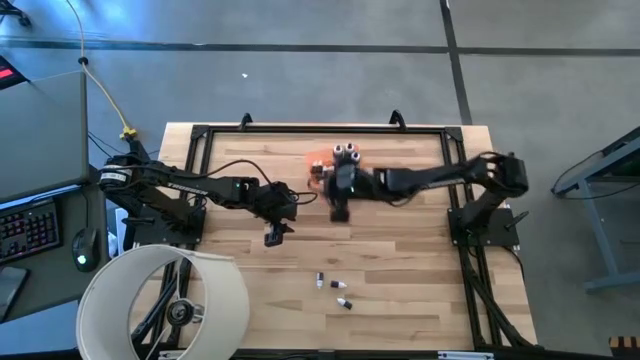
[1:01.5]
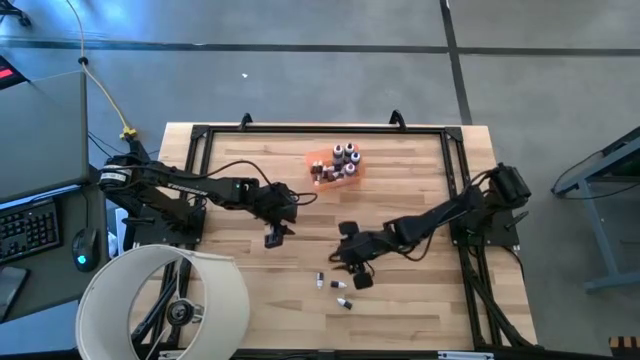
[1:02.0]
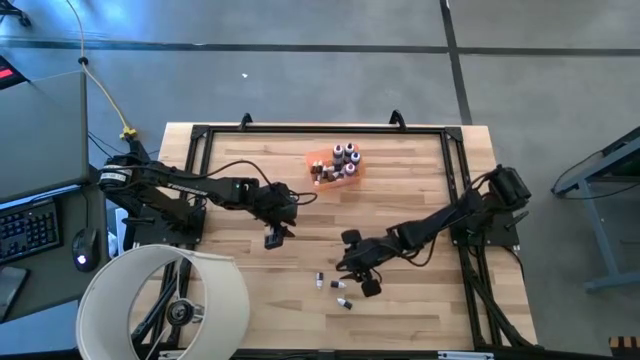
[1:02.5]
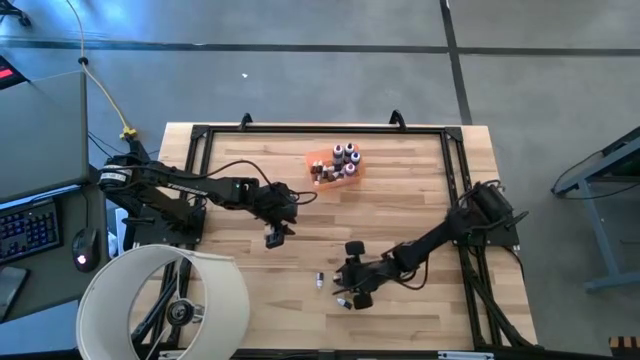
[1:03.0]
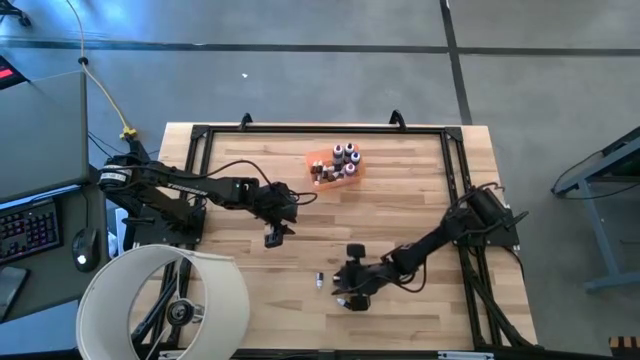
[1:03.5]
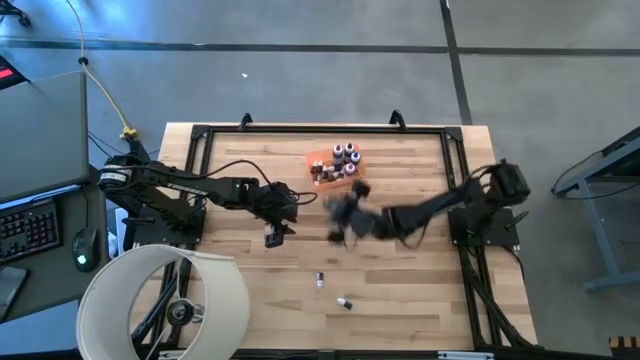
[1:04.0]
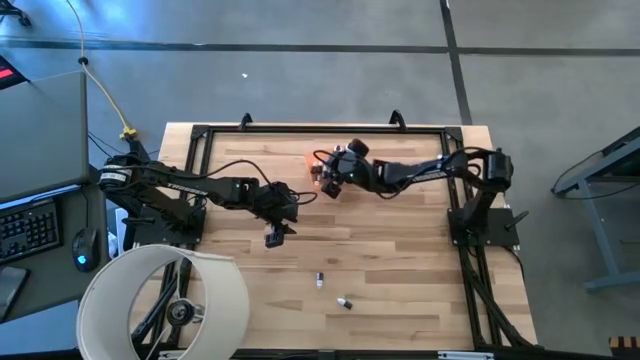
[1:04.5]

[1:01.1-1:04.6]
Task: Pick & Place food coloring
Put the small violet food coloring bottle into the orange bin

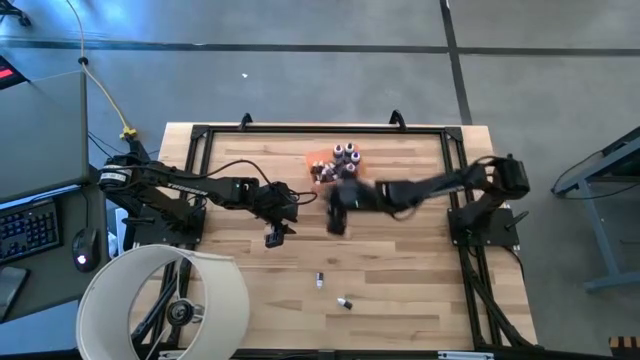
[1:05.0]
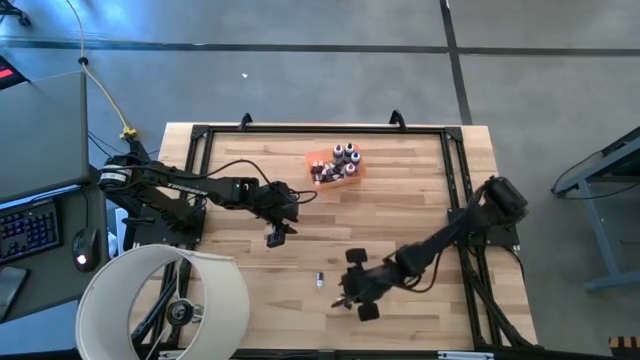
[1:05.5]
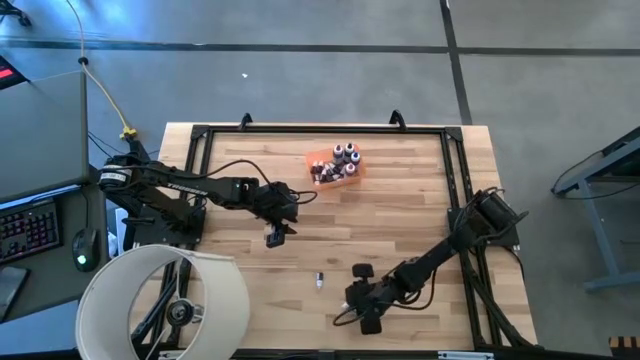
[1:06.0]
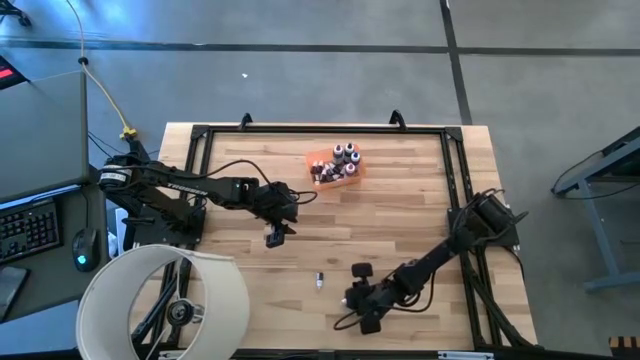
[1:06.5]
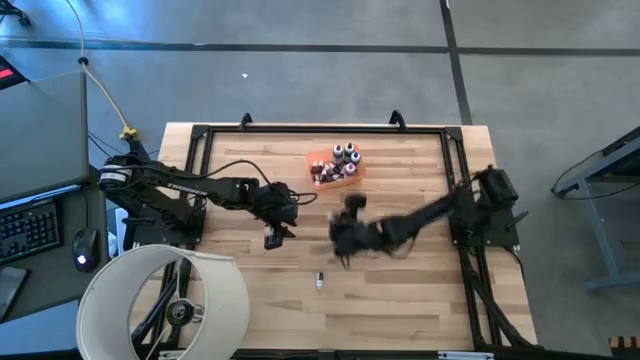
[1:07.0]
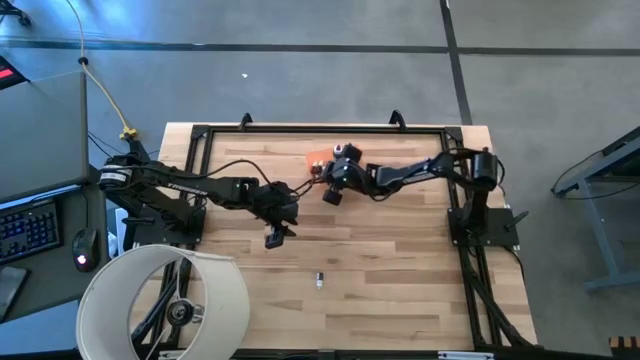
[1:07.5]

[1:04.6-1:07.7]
Put the small green food coloring bottle into the orange bin

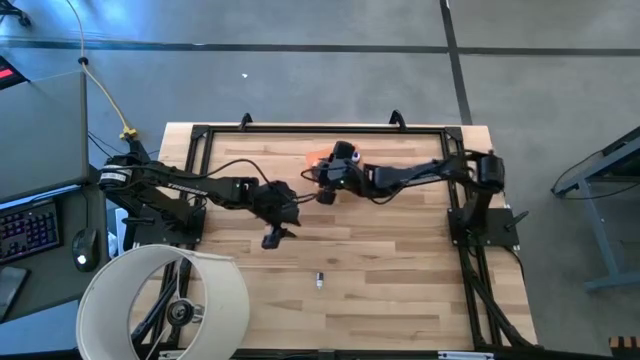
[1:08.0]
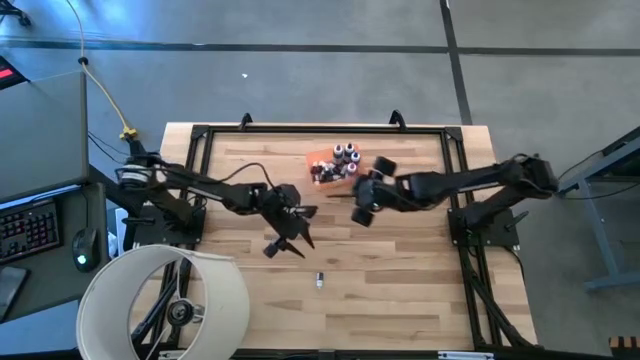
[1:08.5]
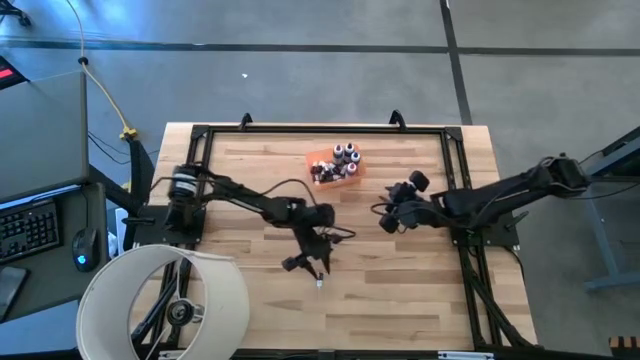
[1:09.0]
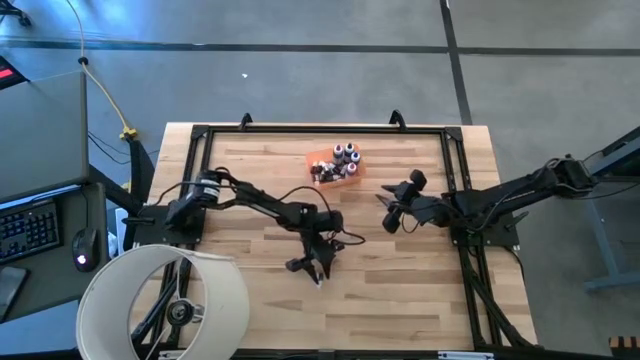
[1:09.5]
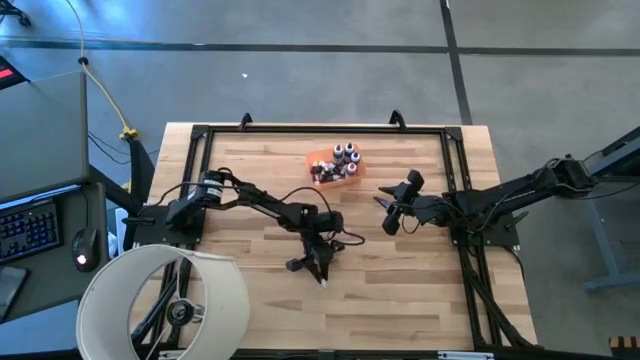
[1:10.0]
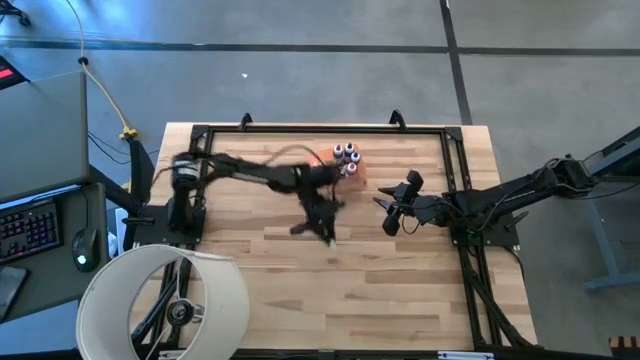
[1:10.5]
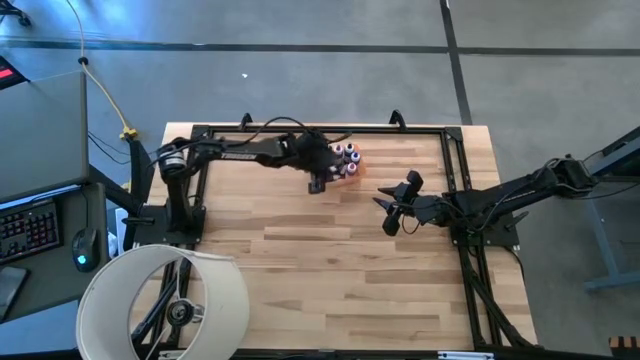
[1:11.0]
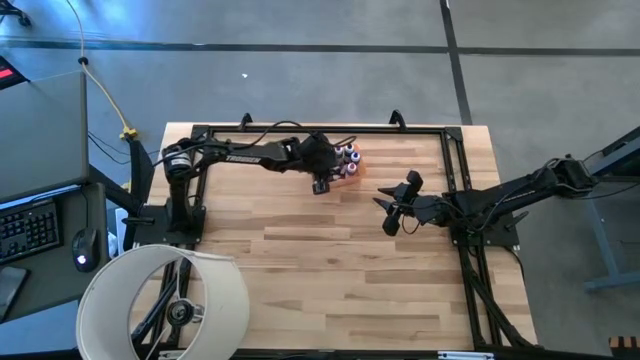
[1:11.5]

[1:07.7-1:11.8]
Put the small black food coloring bottle into the orange bin

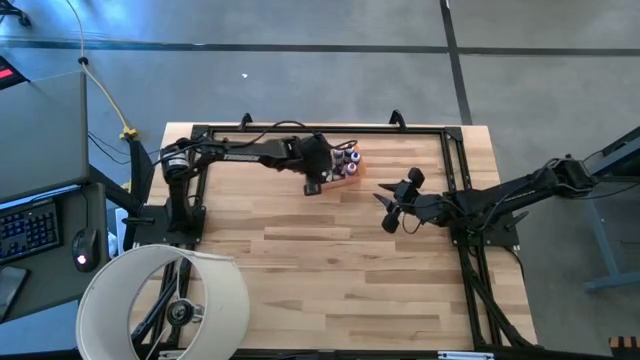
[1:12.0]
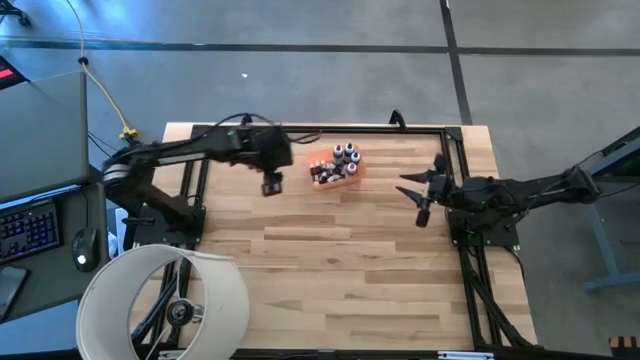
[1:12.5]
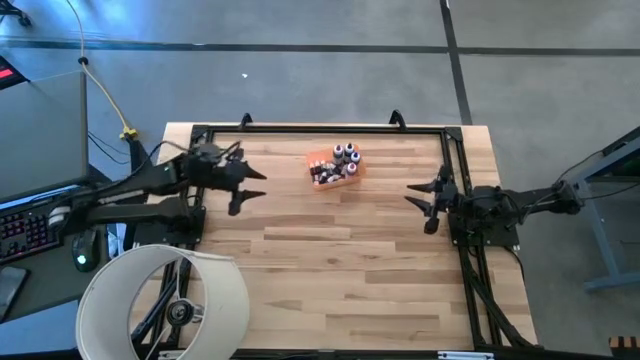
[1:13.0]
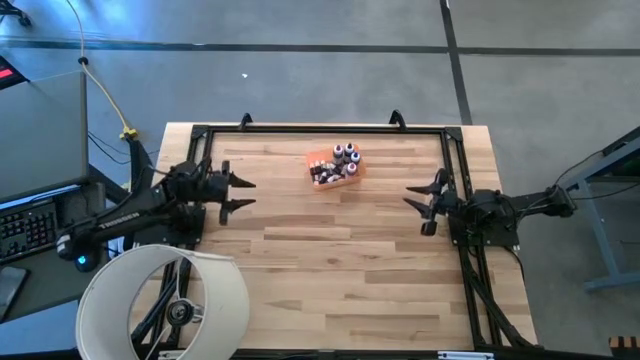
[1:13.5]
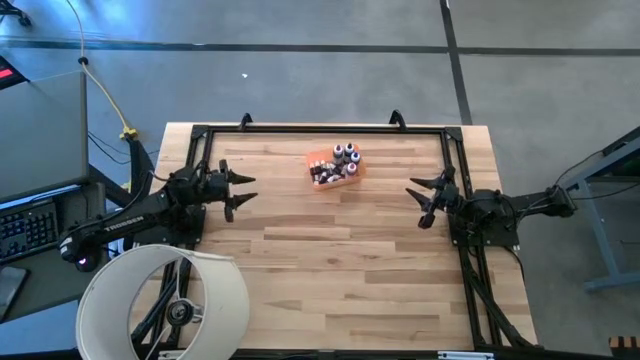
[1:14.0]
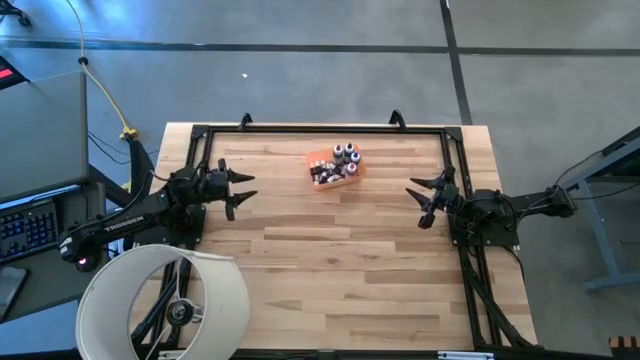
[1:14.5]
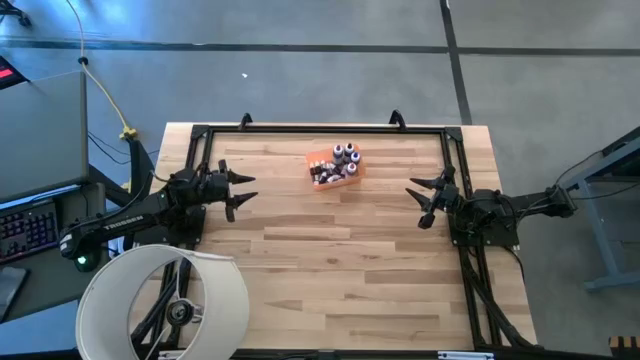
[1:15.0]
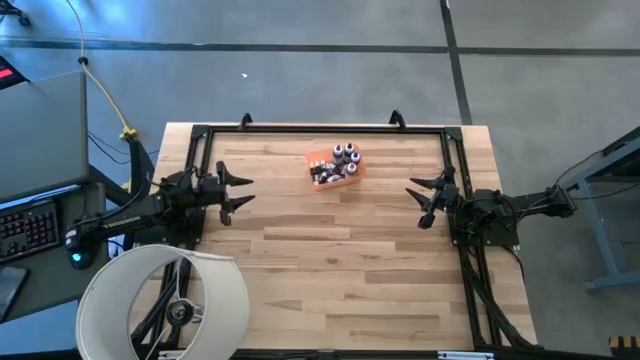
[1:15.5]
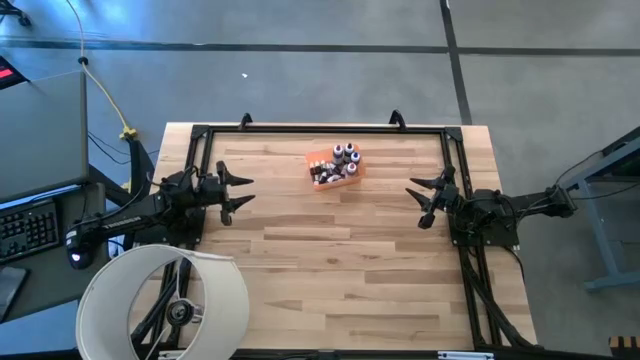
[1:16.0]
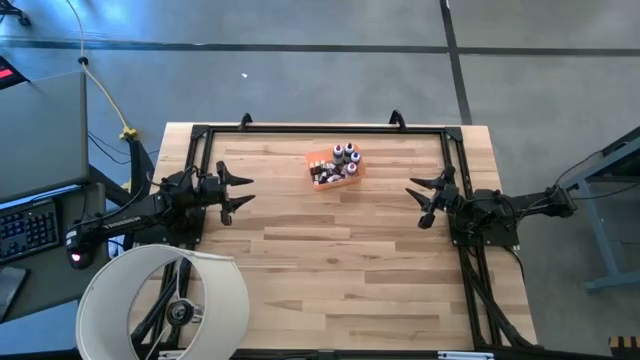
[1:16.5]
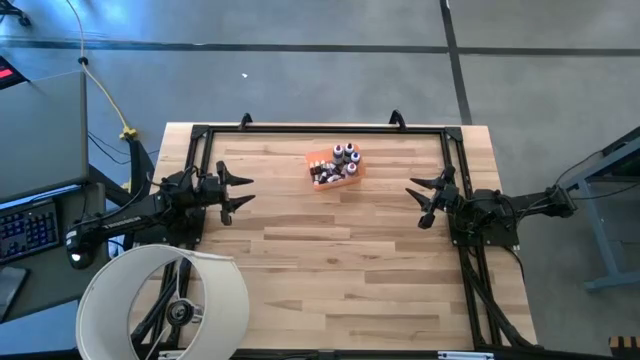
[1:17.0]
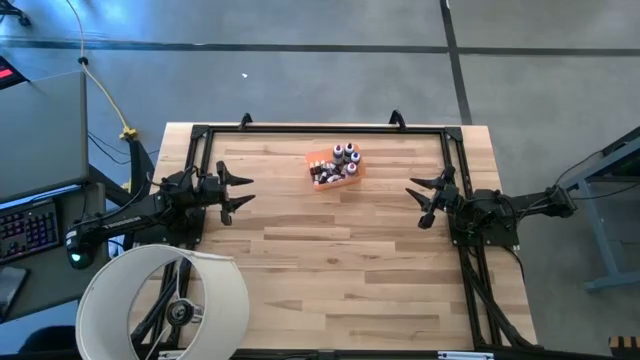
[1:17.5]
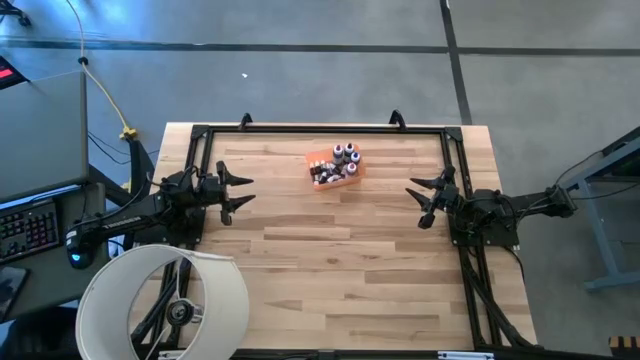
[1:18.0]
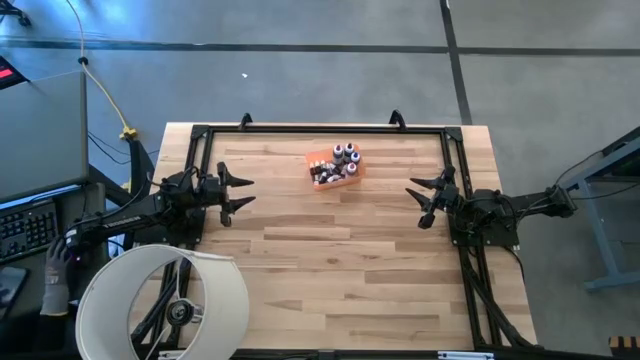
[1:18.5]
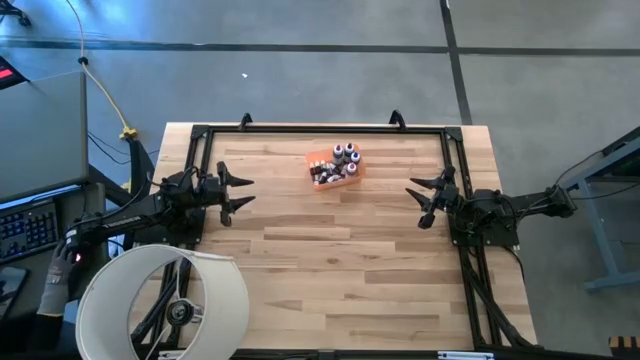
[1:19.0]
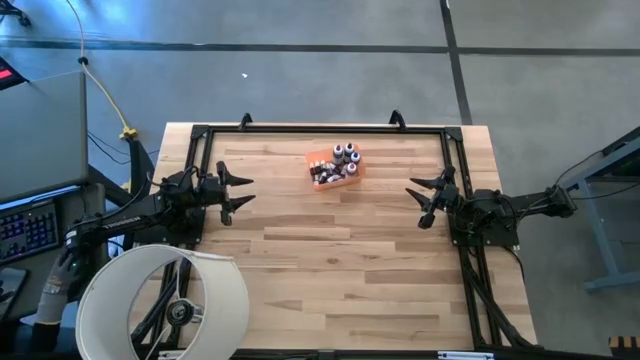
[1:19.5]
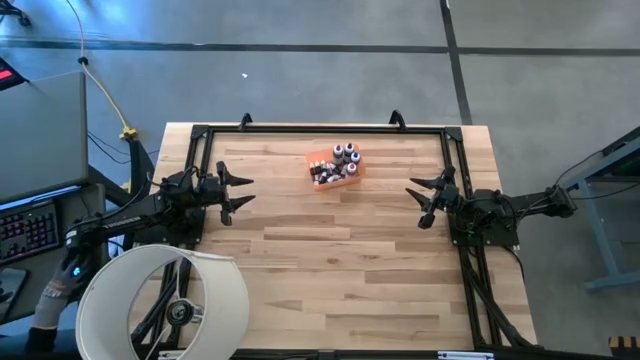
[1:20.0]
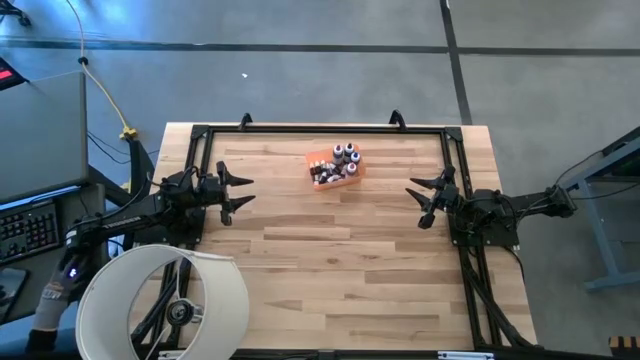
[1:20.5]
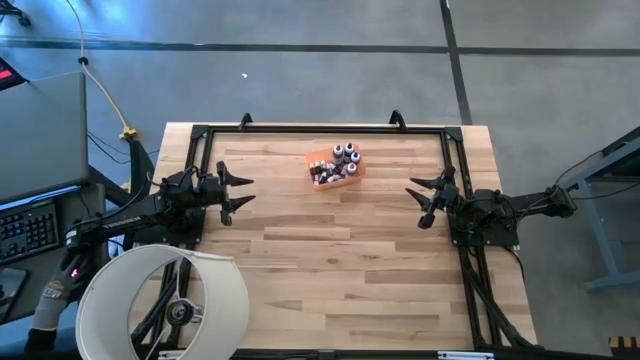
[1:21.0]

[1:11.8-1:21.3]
Return to Home Position

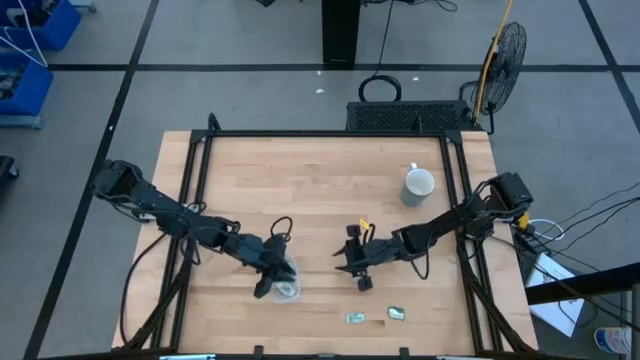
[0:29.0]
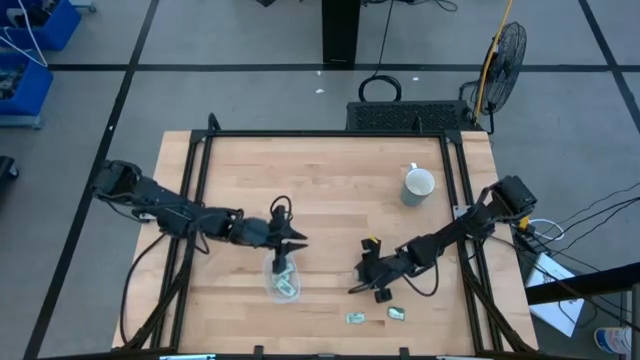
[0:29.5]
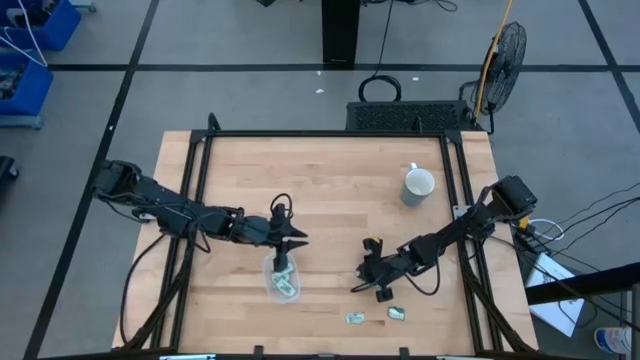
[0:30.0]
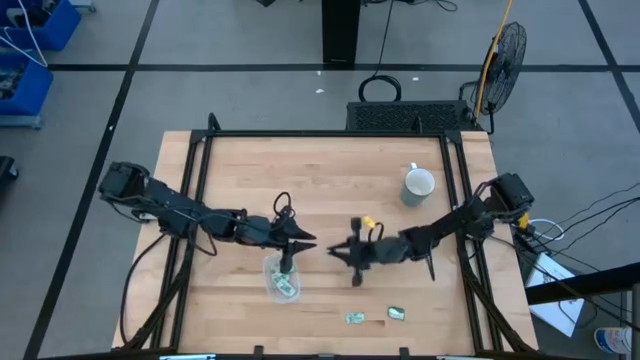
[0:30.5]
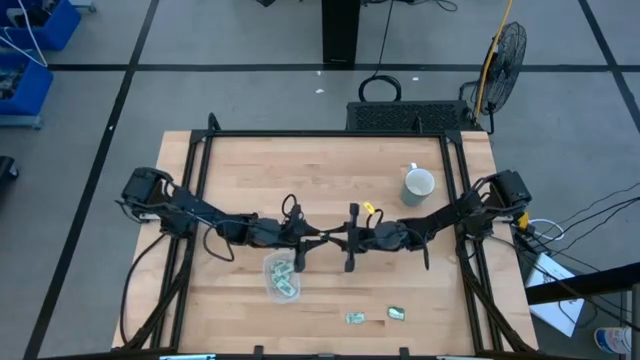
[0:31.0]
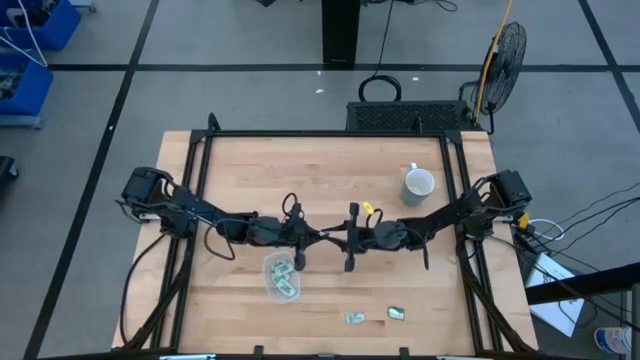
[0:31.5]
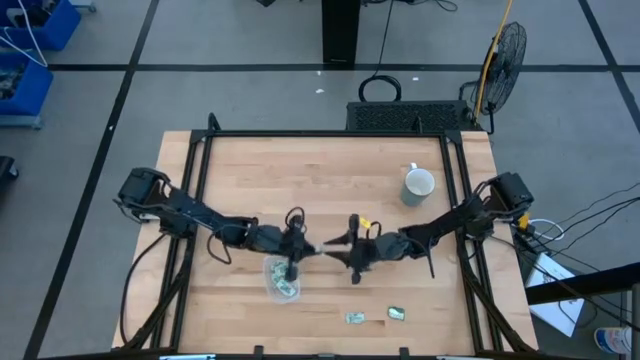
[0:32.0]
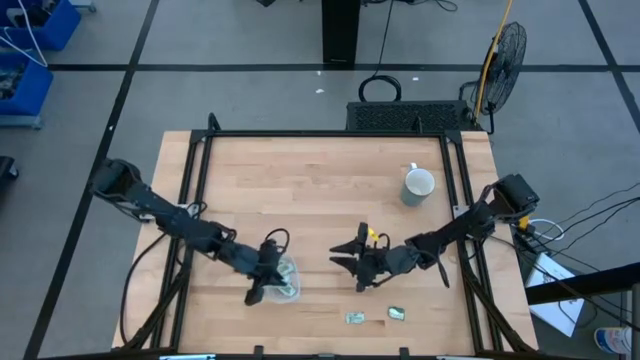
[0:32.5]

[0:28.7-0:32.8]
Task: Pick and place Stevia / Truvia into bins
Put the stevia packet into the transparent container
